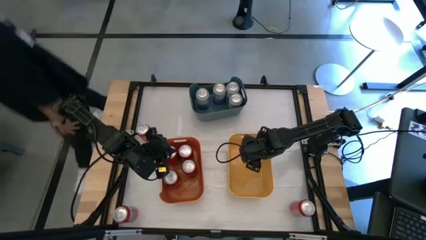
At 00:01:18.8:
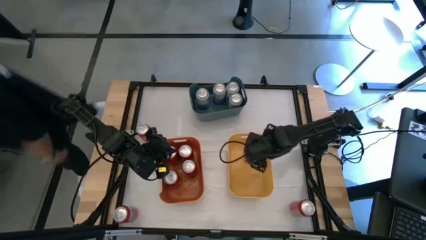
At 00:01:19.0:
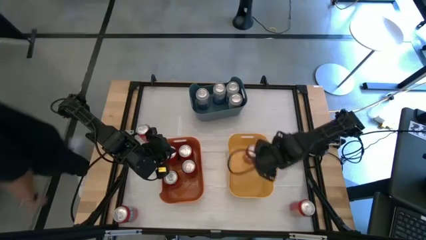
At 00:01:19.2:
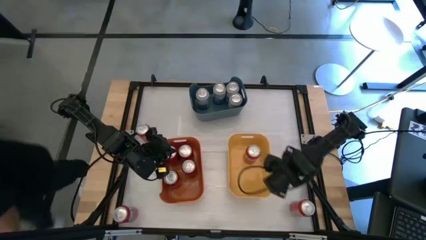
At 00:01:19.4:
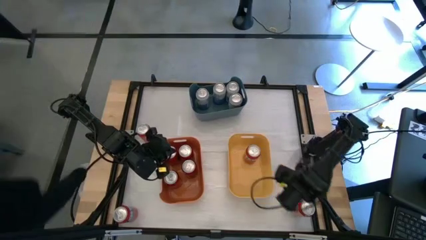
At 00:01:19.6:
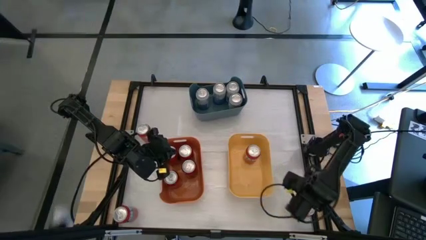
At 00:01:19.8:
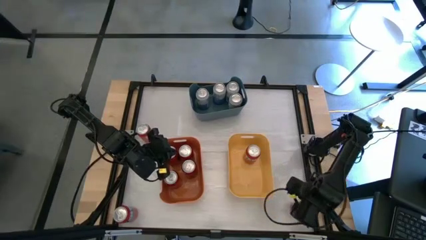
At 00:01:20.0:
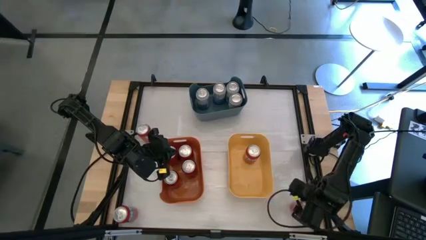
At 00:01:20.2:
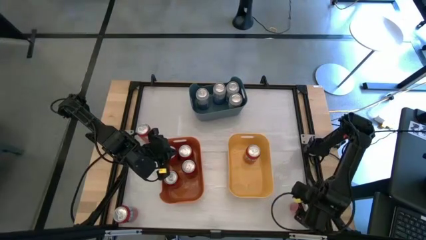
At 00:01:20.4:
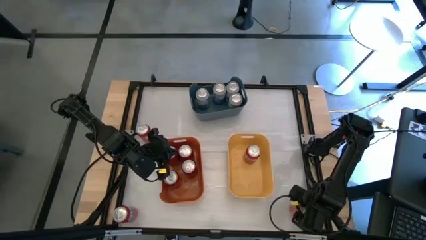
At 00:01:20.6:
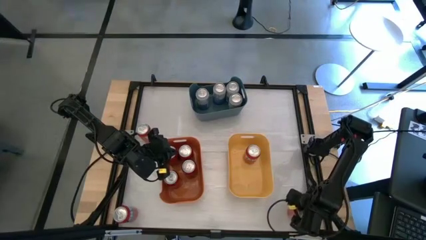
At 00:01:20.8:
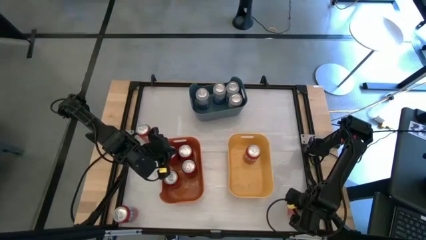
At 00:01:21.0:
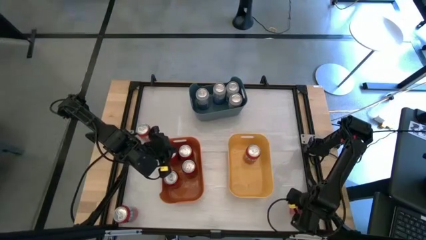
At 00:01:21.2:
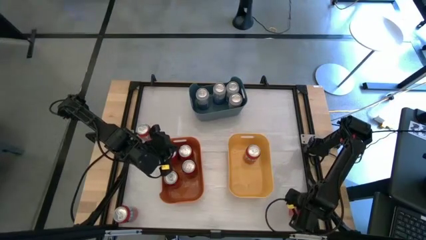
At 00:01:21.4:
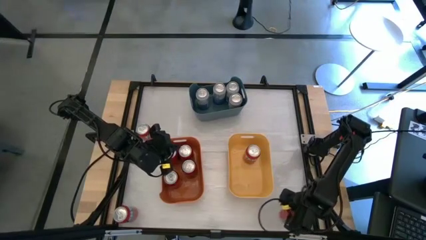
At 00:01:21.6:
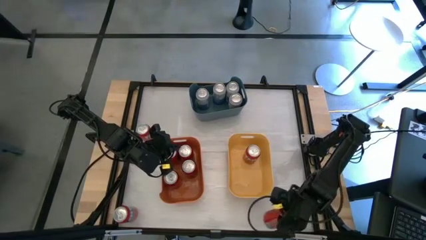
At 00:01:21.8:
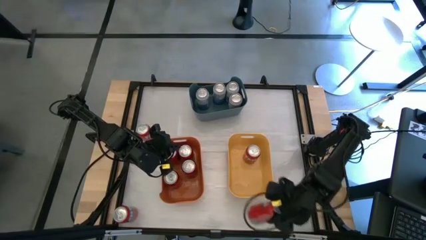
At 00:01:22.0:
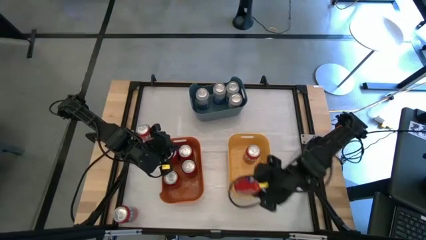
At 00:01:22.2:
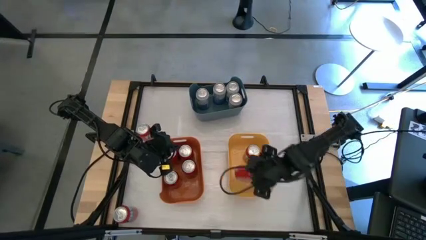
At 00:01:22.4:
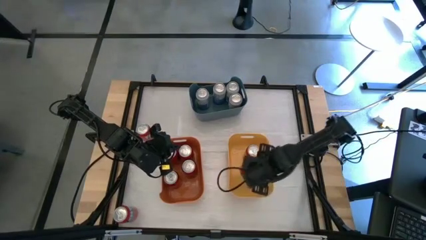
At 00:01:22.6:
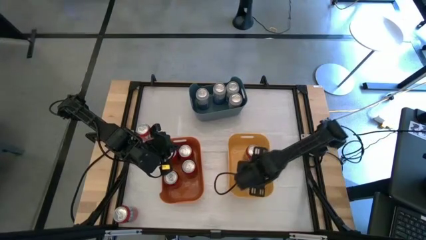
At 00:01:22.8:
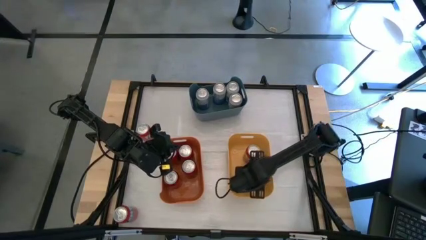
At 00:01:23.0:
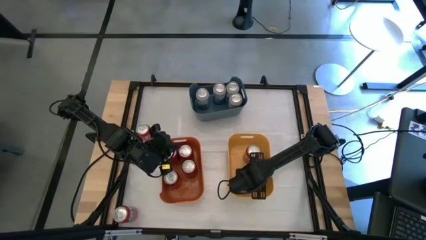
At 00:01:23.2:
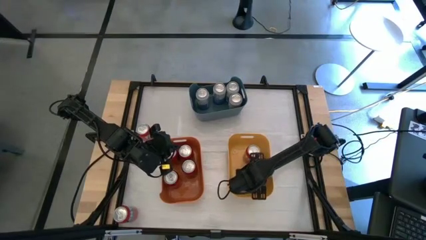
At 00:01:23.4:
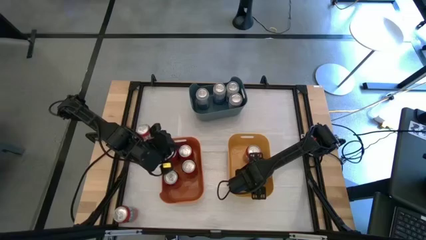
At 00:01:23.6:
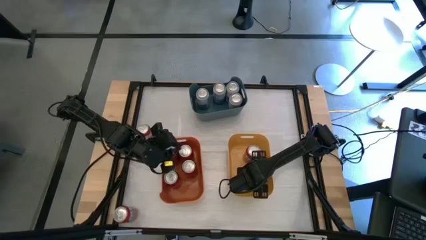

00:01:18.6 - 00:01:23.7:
Task: Sort soda cans
Put the bottom right red soda can into the yellow bin

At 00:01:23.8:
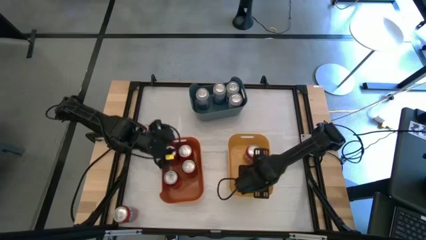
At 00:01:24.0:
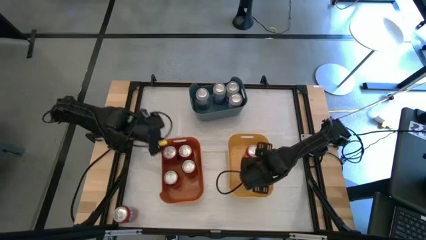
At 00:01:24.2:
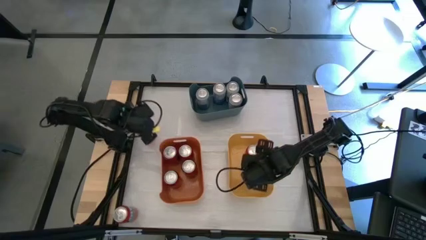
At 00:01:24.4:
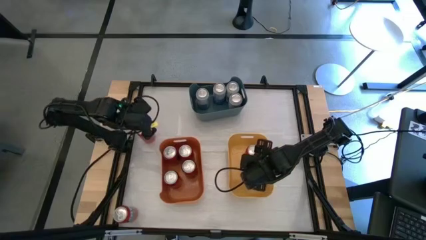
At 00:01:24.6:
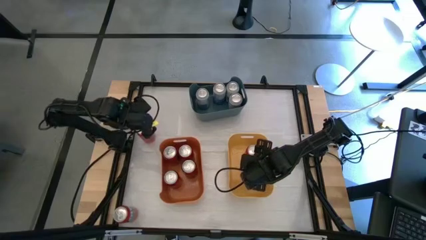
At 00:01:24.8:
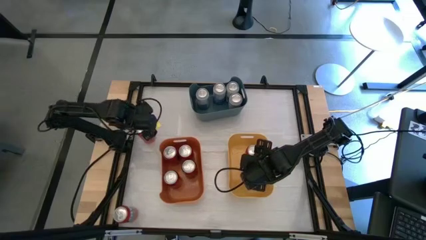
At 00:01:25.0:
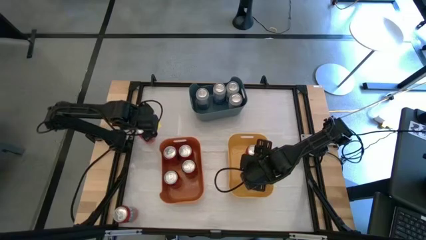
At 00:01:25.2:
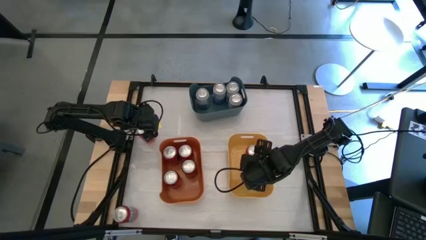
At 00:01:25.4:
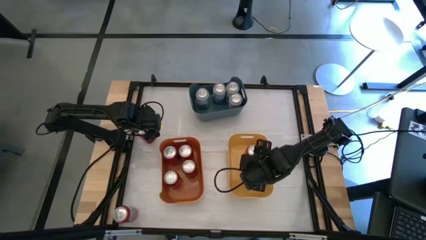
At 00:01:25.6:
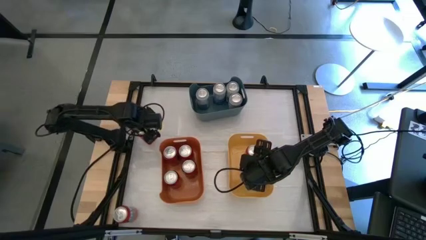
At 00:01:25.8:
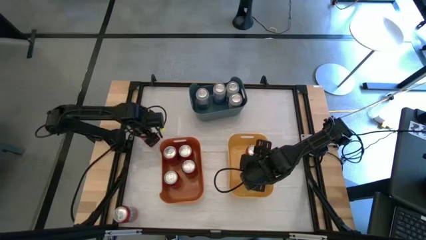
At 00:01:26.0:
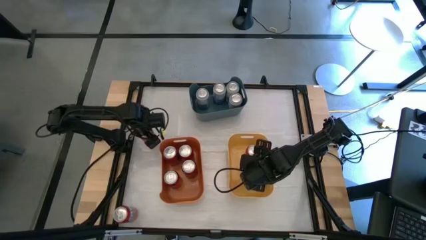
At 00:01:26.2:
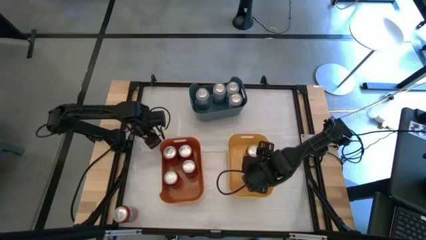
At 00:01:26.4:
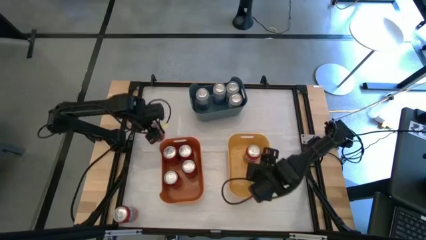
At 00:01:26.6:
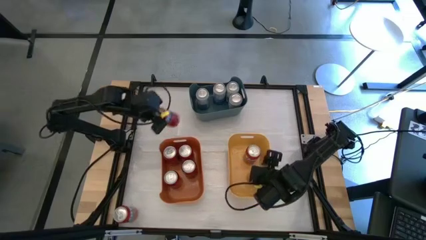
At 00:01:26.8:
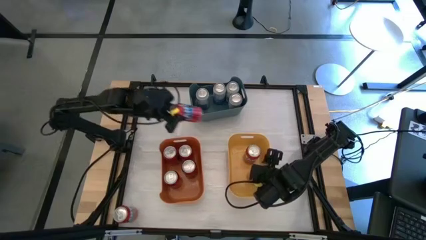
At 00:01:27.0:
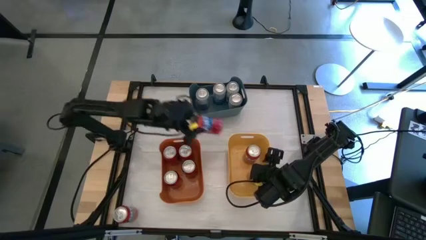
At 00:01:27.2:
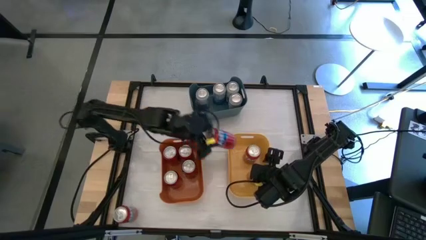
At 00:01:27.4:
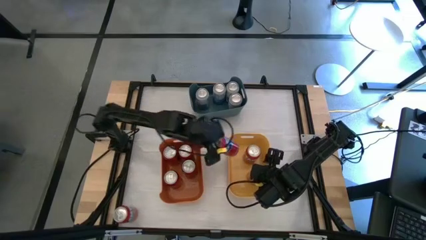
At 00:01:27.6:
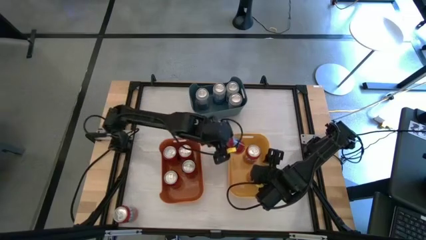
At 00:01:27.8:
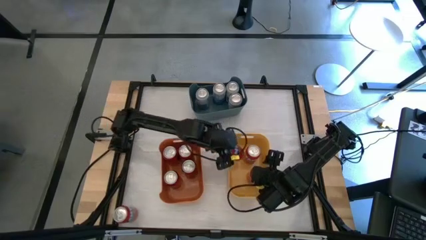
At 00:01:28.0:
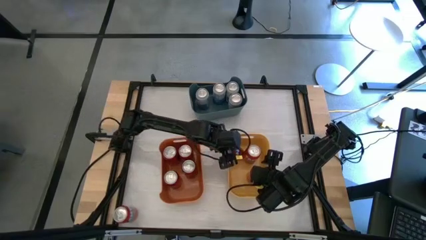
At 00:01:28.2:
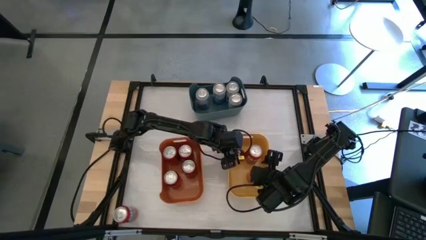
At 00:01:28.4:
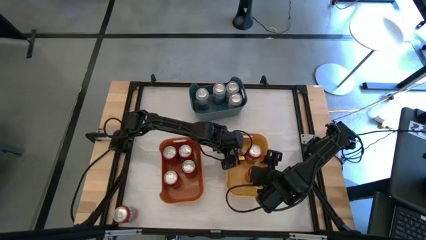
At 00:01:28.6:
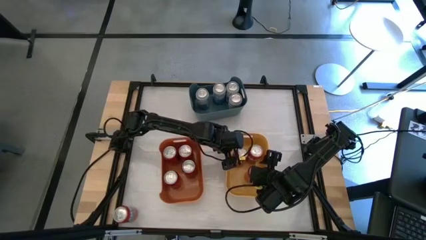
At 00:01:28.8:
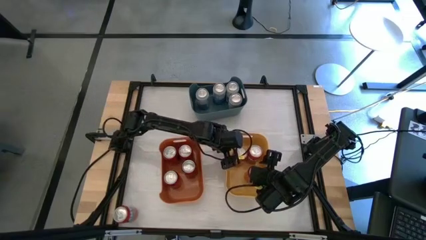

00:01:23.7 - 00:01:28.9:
Put the top red soda can into the yellow bin

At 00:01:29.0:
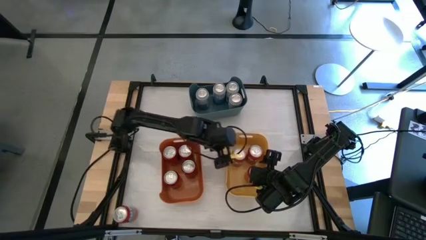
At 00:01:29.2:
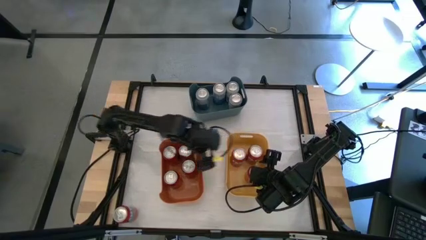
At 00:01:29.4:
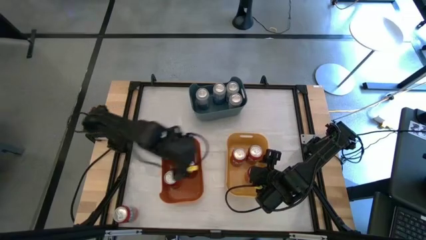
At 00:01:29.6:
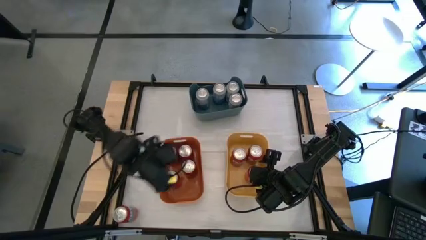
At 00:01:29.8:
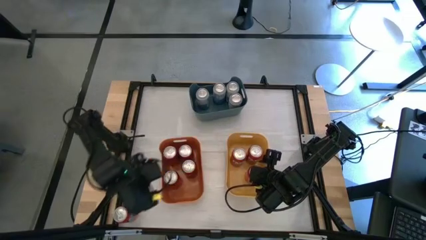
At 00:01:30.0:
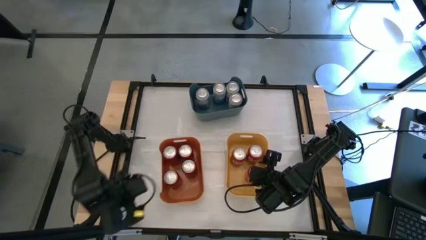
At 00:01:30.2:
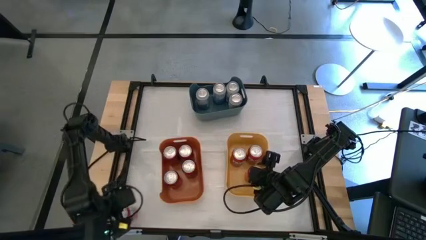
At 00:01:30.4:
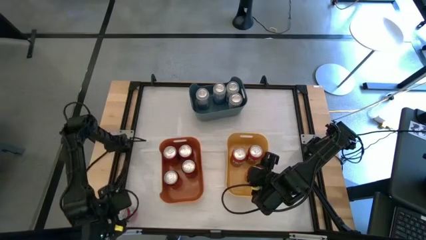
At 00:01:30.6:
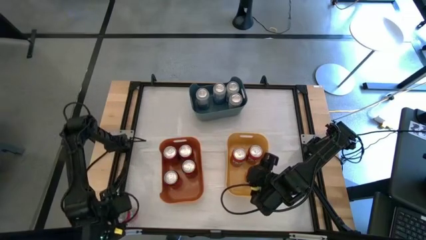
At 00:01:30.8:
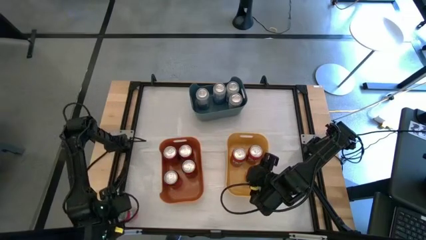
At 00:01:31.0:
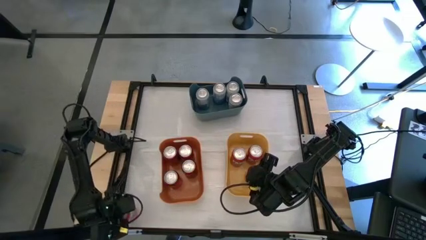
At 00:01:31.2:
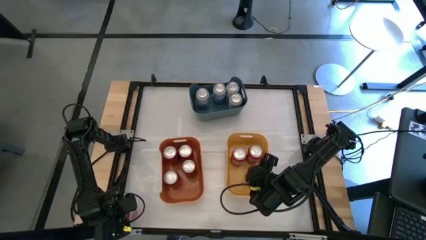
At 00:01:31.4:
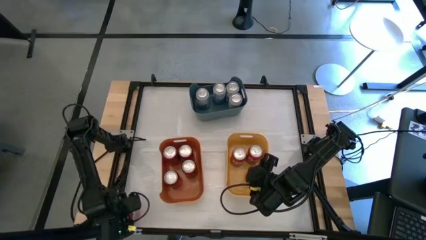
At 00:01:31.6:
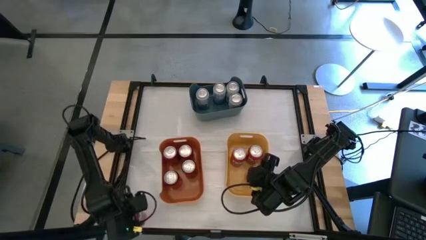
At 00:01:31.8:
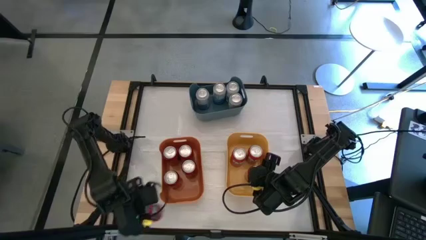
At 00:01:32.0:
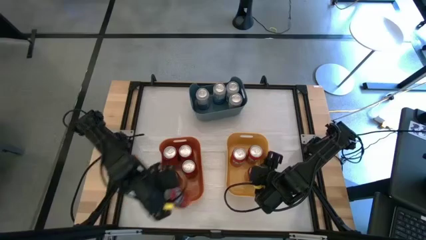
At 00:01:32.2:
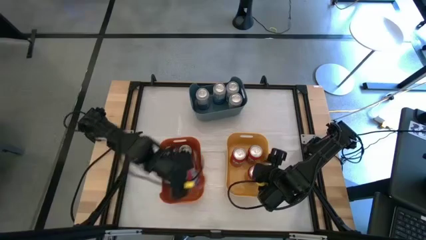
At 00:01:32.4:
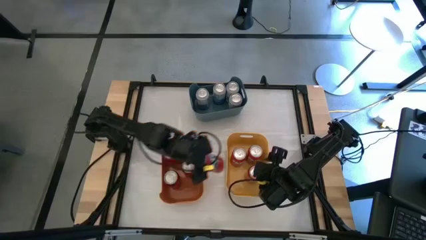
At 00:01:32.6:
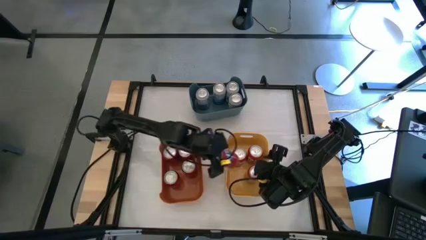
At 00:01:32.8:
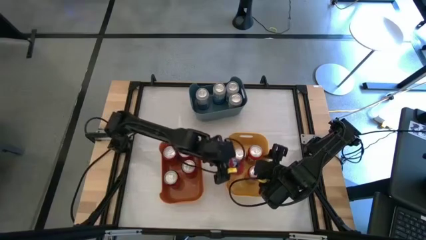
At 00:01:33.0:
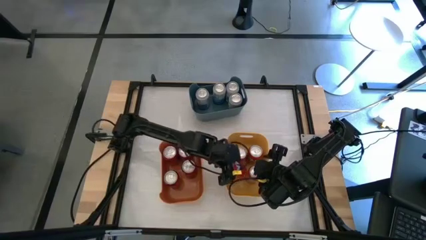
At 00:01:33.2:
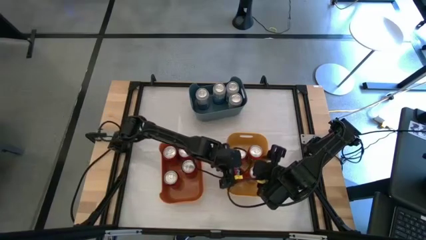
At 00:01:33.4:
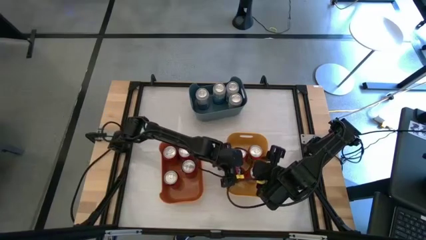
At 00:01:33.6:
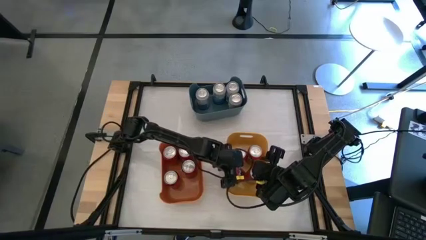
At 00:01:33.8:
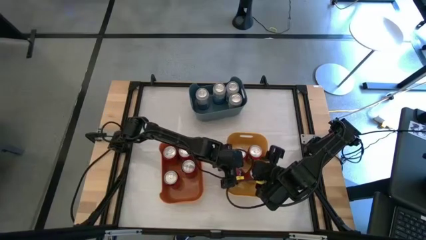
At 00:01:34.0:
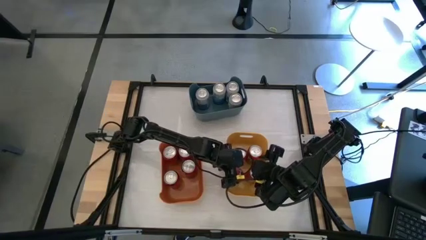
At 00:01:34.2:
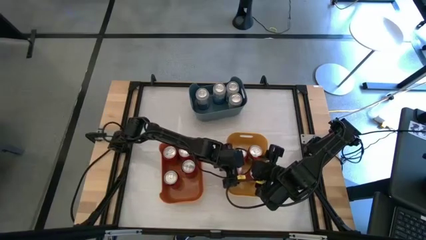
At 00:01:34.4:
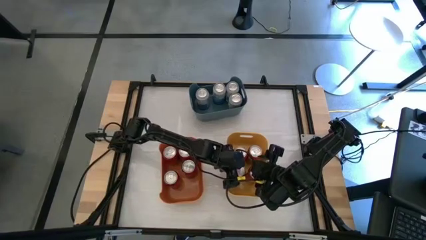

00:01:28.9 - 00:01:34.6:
Put the red soda can into the yellow bin
